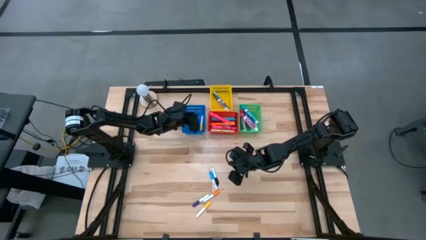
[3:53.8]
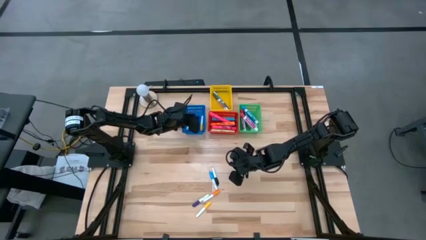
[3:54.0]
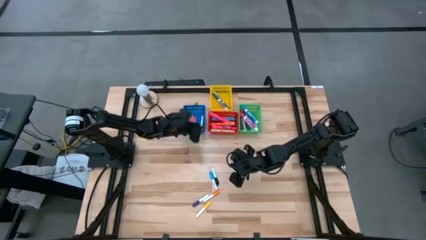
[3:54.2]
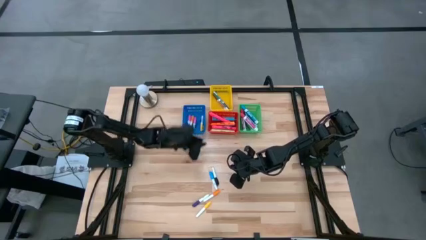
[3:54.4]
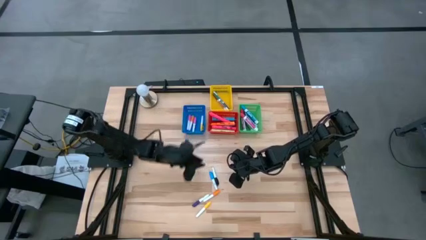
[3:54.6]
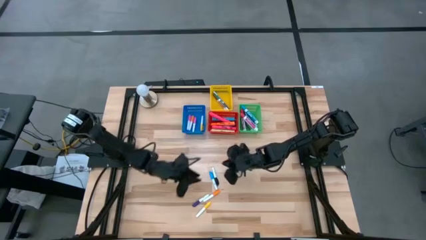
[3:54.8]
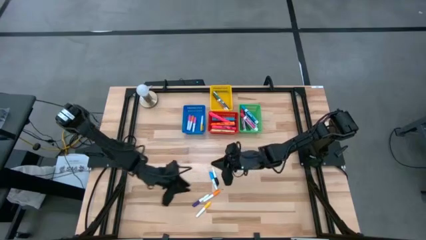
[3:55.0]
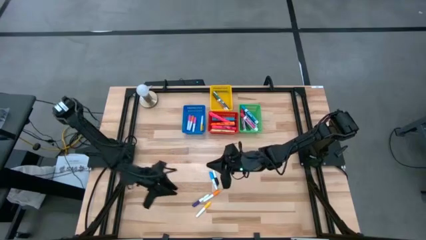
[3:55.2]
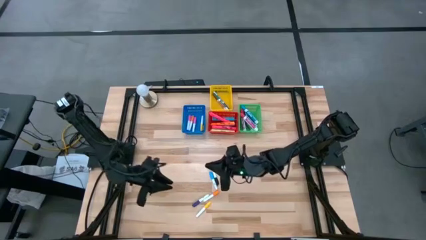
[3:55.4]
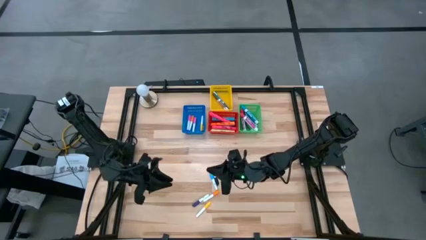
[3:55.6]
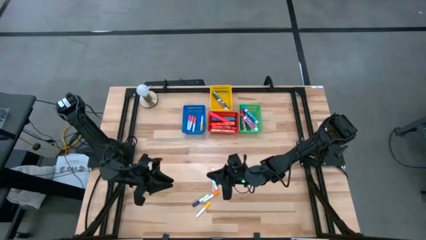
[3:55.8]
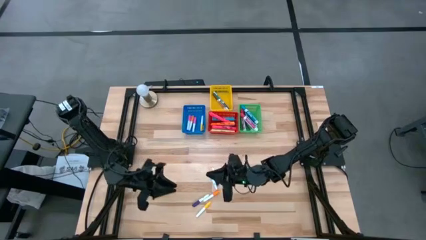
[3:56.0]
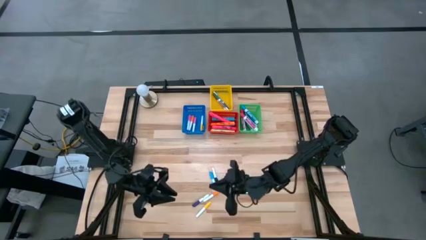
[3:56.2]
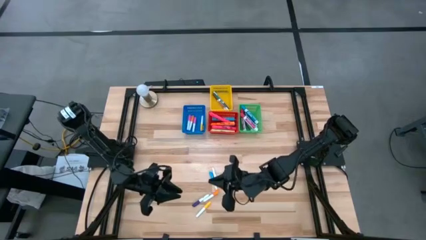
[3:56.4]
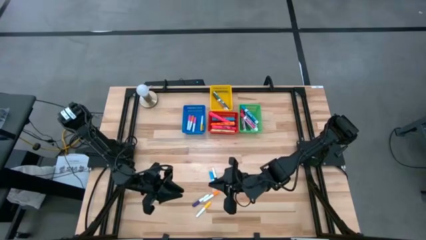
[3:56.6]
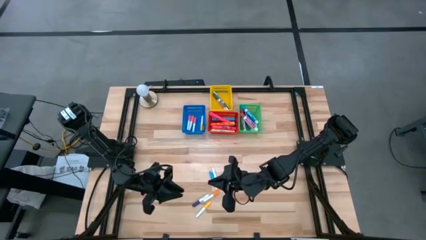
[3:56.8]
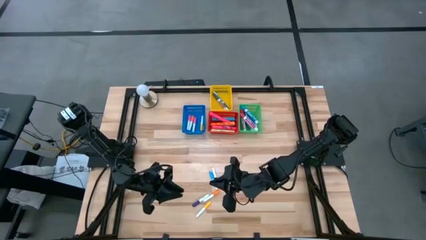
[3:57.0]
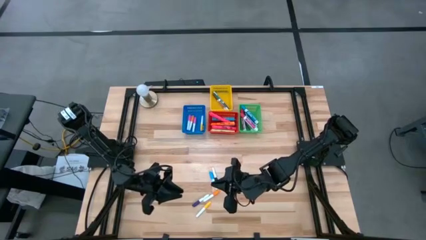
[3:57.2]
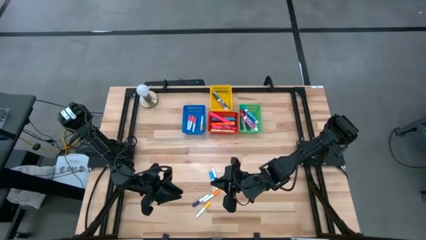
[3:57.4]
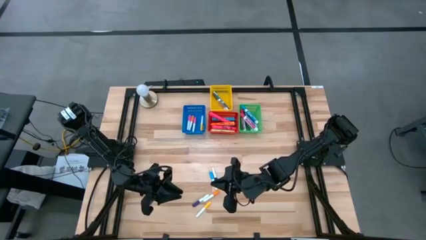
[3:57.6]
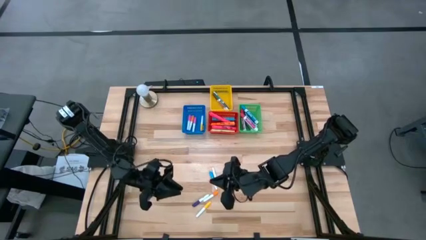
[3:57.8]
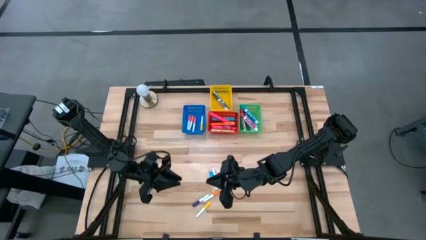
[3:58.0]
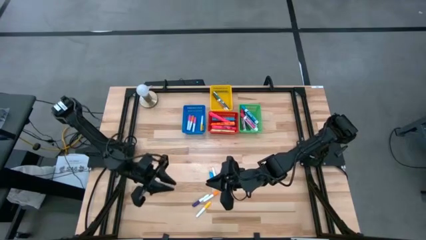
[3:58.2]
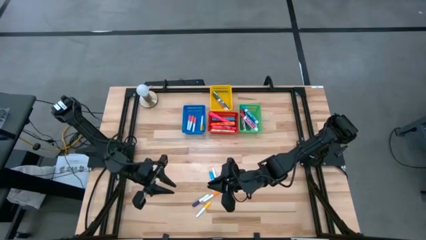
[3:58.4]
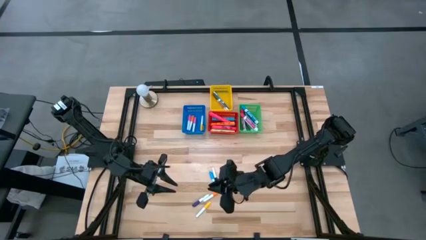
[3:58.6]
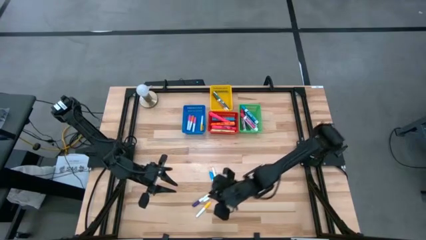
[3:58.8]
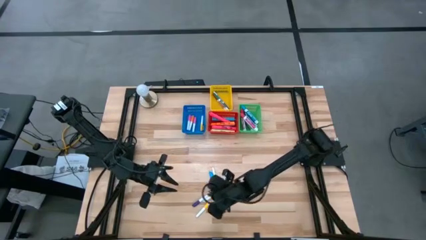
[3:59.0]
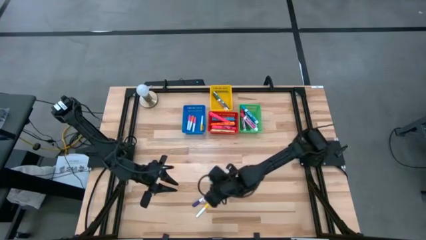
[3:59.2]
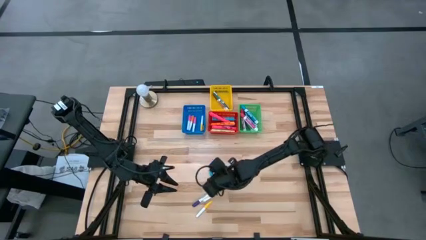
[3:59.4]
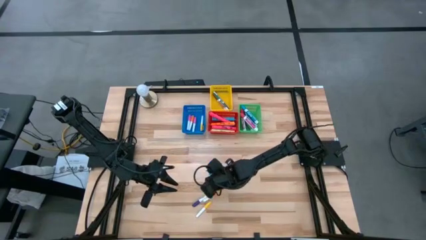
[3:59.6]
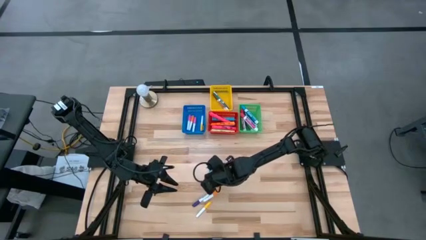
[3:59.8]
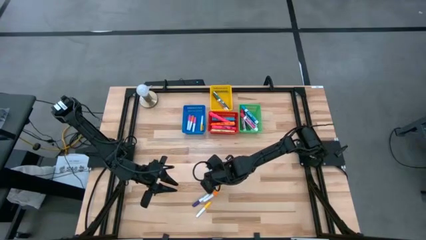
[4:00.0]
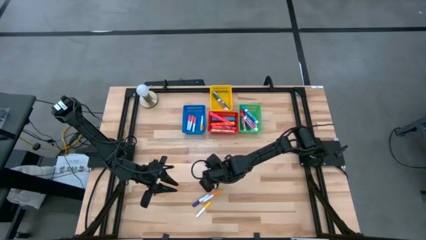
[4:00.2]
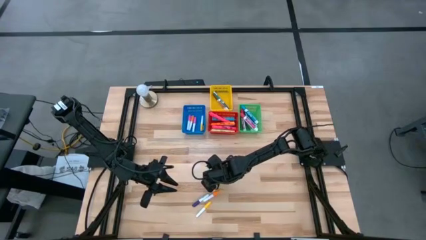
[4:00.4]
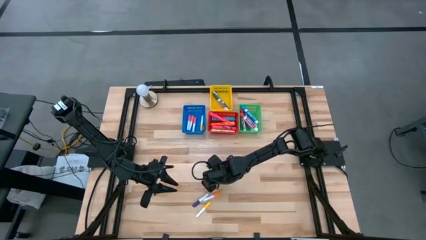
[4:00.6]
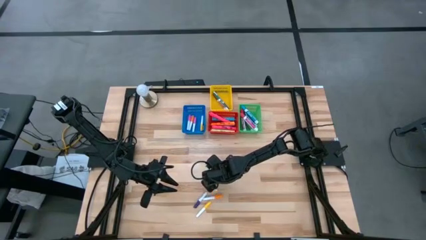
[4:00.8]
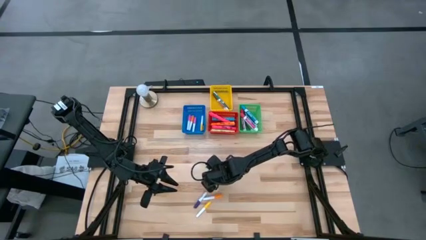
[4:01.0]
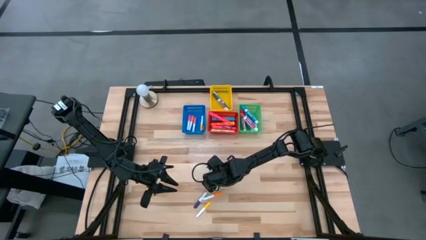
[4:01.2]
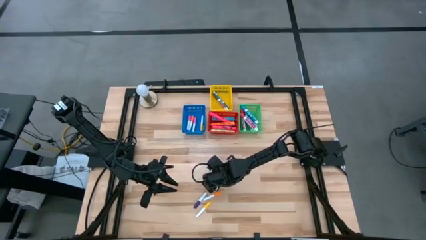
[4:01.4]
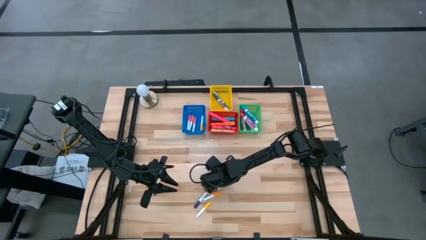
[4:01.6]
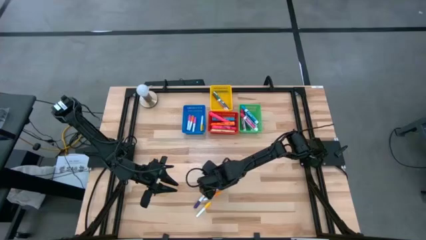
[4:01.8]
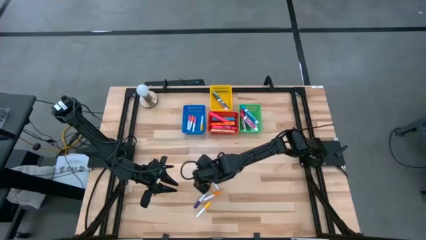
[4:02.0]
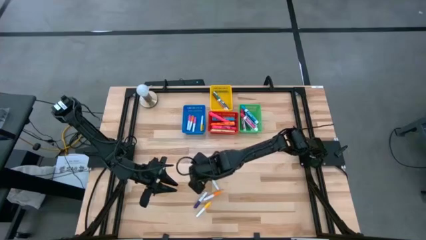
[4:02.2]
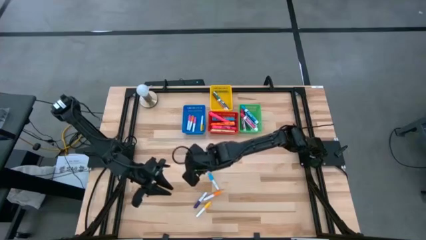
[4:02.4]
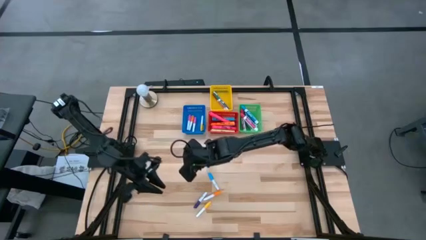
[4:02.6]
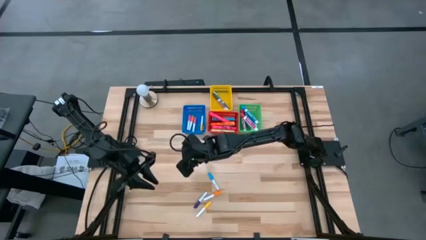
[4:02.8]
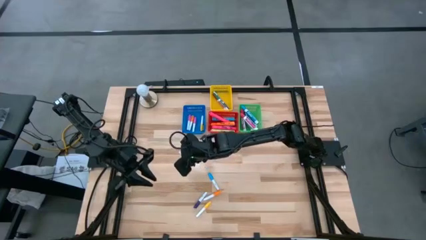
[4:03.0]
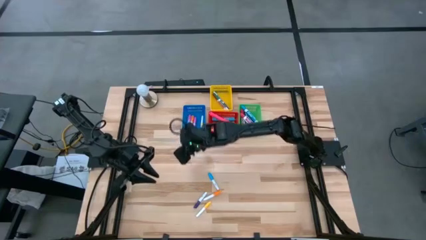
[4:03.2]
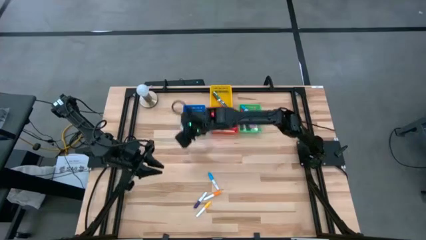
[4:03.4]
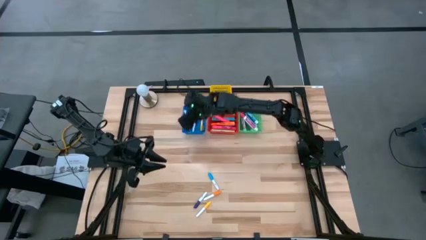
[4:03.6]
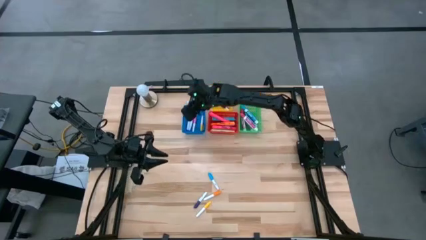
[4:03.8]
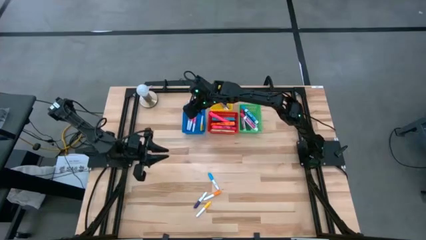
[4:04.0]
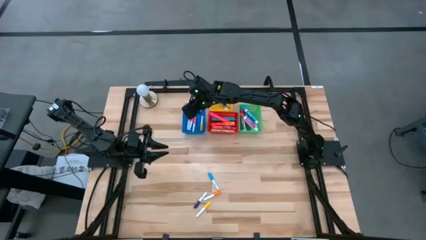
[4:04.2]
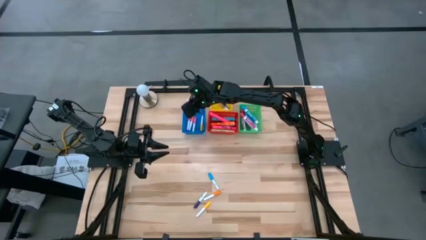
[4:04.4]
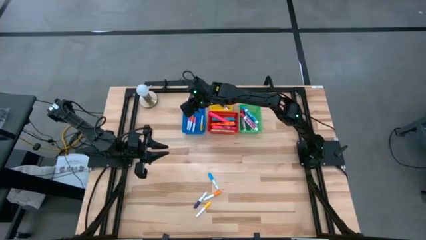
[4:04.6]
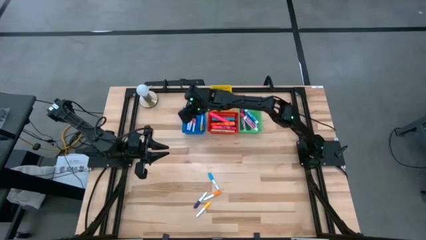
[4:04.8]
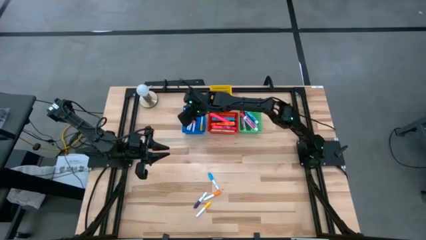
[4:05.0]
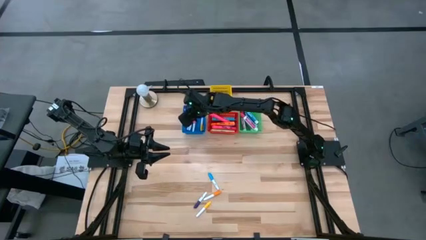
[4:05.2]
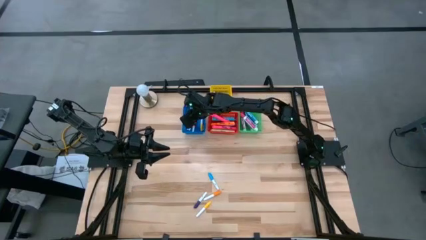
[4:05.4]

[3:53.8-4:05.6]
Task: Pick & Place Markers
Put the small black highlighter pen into the blue bin
